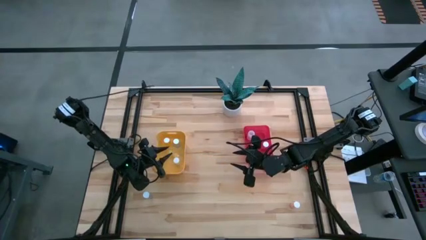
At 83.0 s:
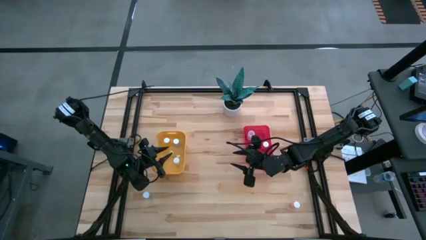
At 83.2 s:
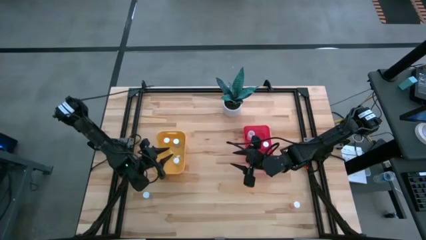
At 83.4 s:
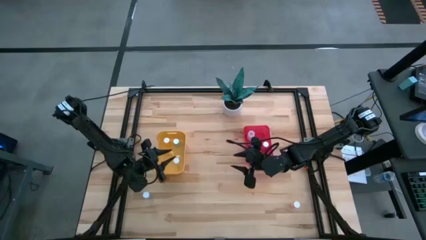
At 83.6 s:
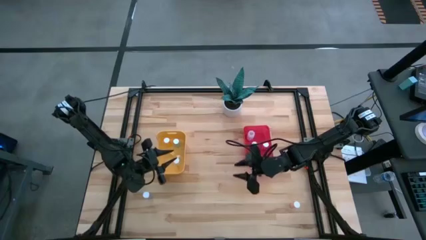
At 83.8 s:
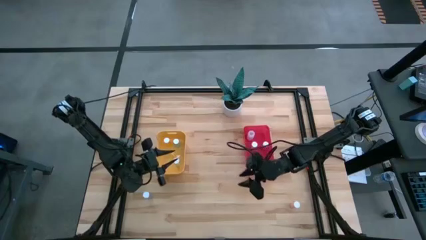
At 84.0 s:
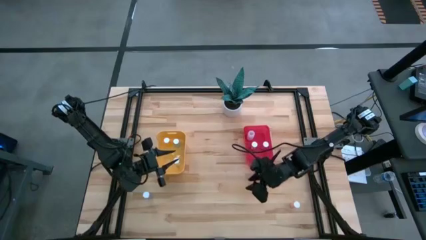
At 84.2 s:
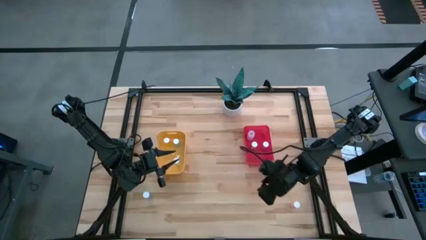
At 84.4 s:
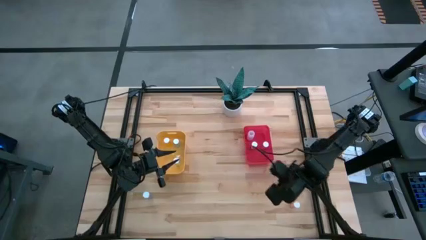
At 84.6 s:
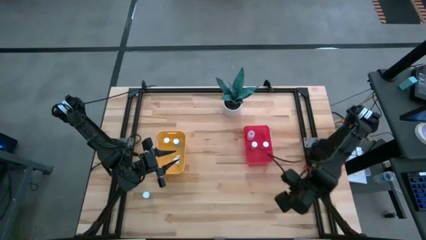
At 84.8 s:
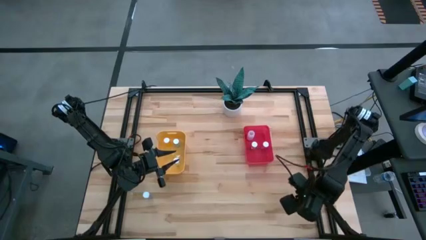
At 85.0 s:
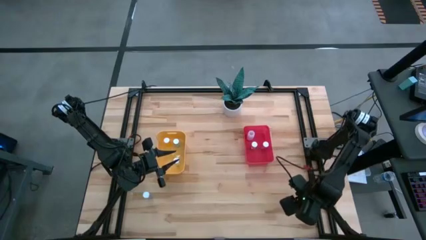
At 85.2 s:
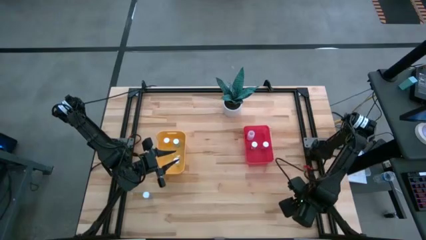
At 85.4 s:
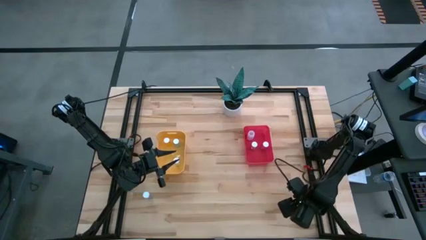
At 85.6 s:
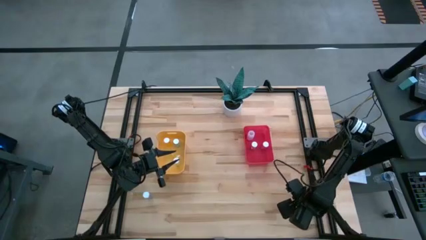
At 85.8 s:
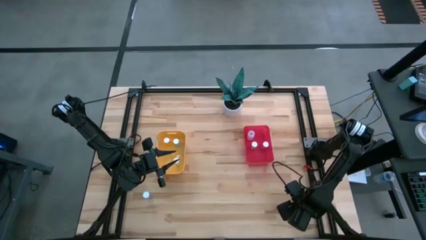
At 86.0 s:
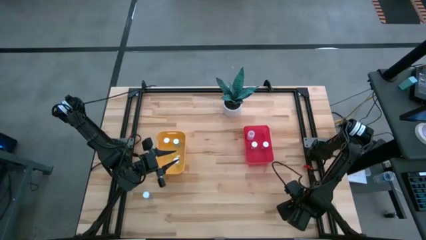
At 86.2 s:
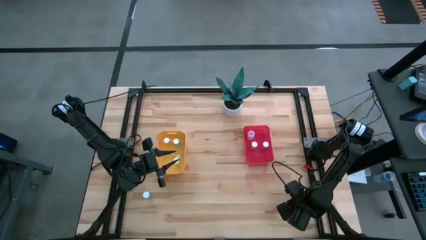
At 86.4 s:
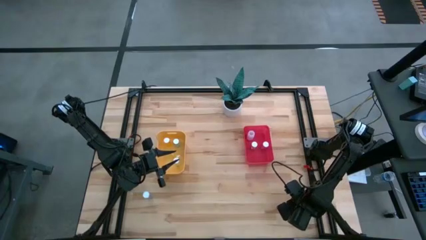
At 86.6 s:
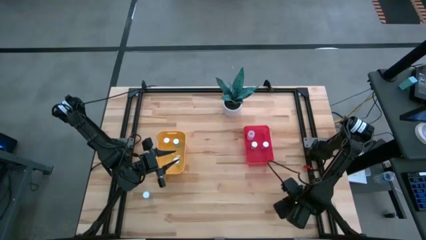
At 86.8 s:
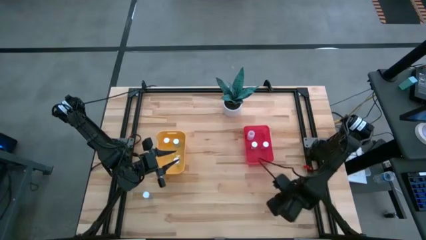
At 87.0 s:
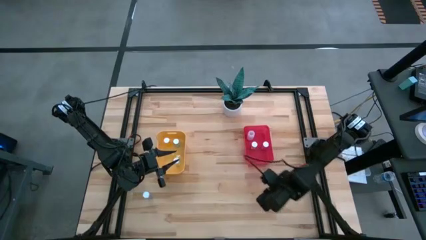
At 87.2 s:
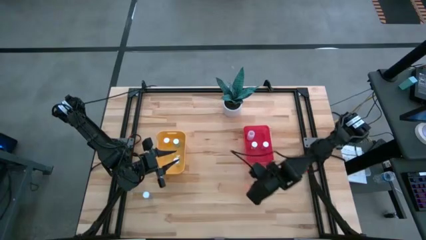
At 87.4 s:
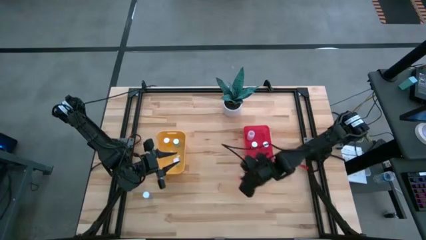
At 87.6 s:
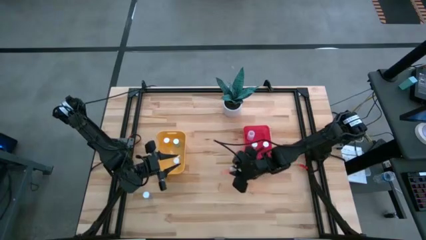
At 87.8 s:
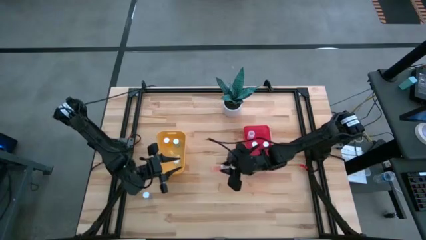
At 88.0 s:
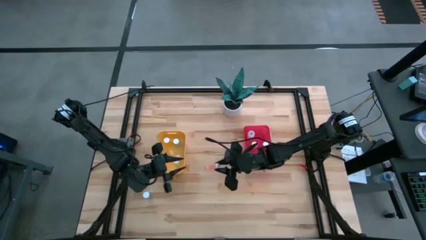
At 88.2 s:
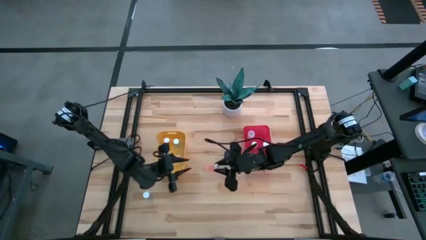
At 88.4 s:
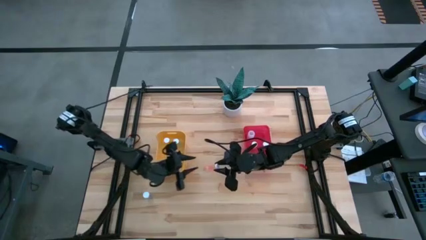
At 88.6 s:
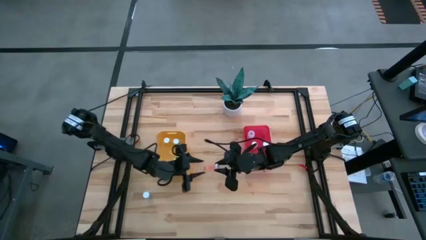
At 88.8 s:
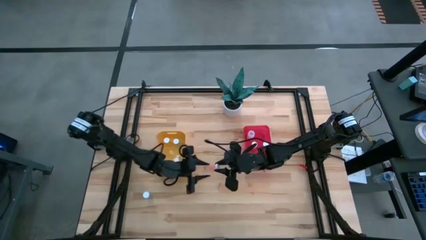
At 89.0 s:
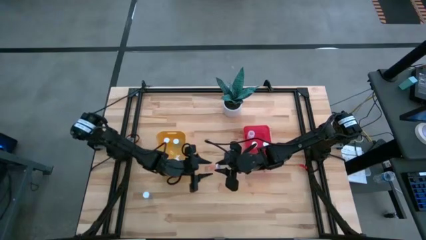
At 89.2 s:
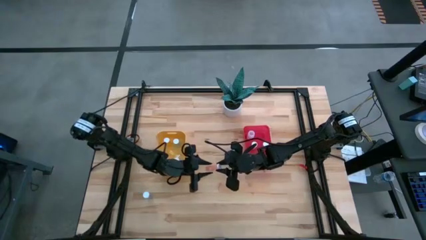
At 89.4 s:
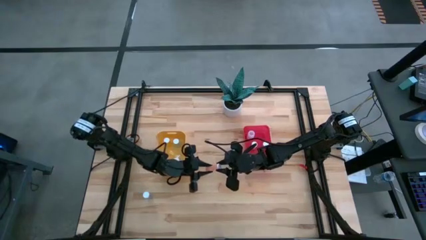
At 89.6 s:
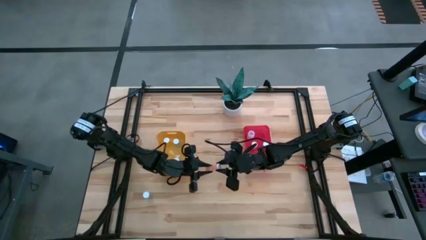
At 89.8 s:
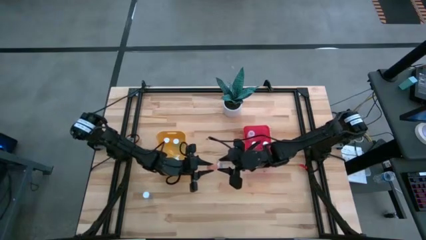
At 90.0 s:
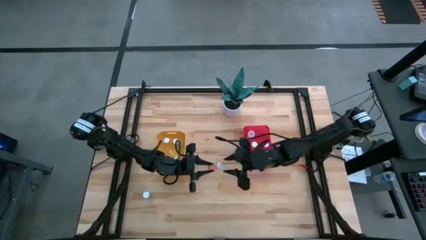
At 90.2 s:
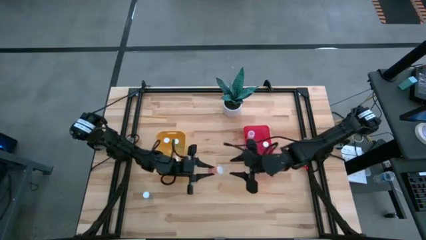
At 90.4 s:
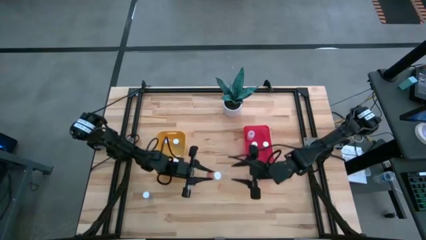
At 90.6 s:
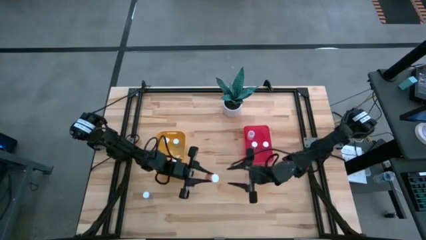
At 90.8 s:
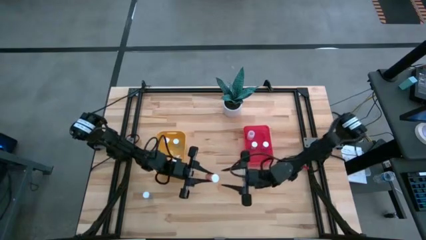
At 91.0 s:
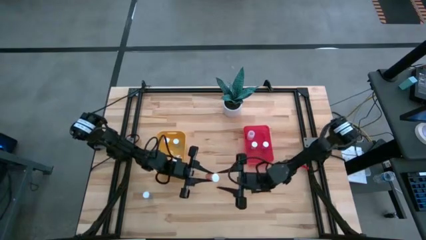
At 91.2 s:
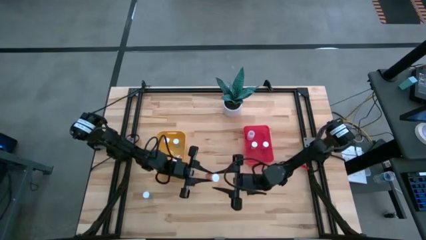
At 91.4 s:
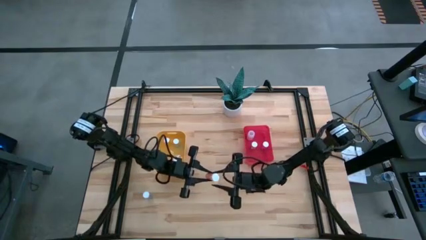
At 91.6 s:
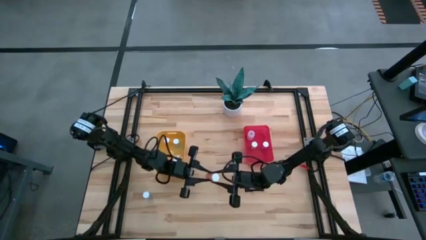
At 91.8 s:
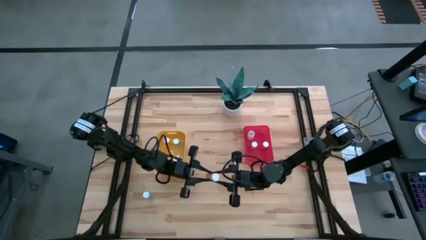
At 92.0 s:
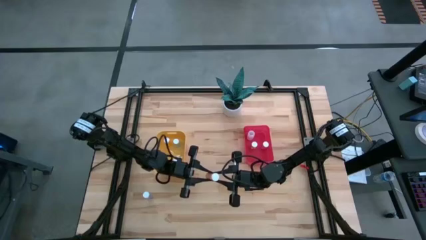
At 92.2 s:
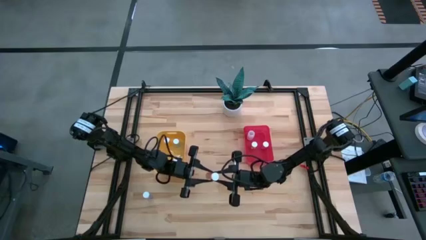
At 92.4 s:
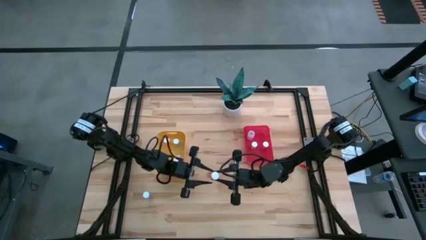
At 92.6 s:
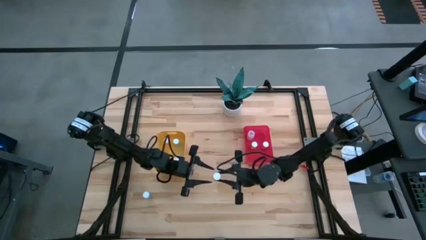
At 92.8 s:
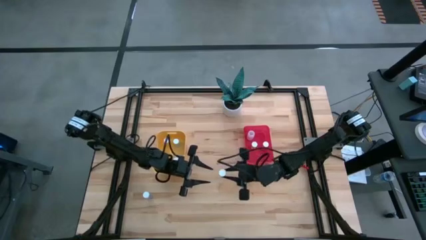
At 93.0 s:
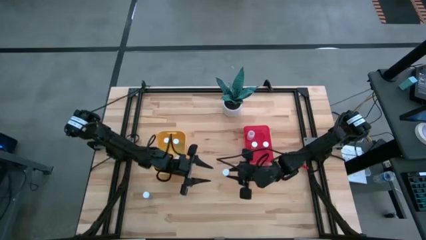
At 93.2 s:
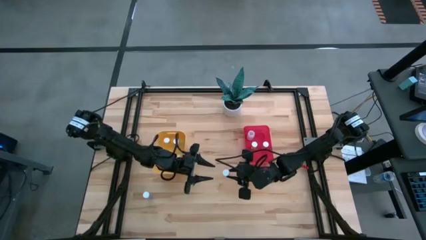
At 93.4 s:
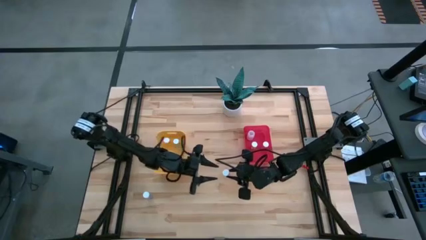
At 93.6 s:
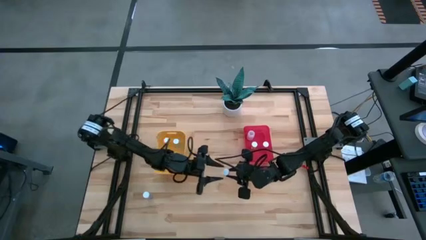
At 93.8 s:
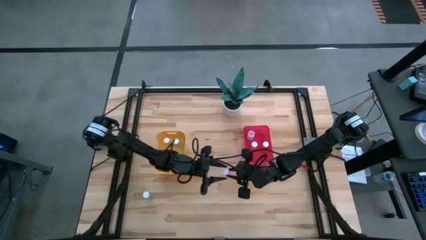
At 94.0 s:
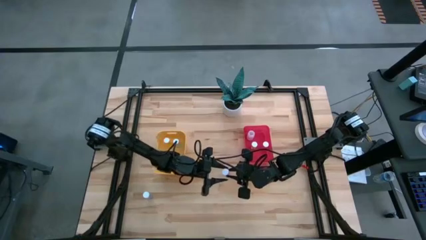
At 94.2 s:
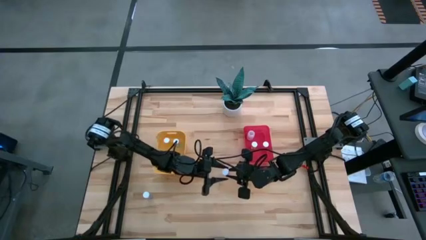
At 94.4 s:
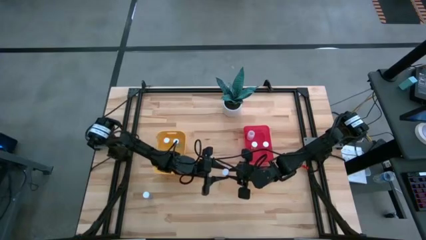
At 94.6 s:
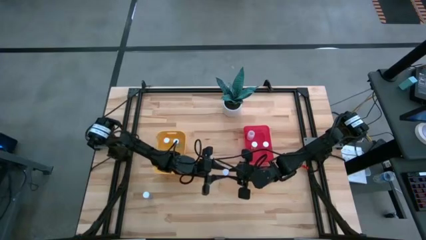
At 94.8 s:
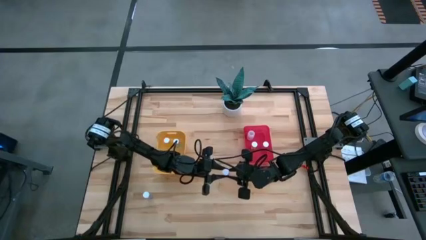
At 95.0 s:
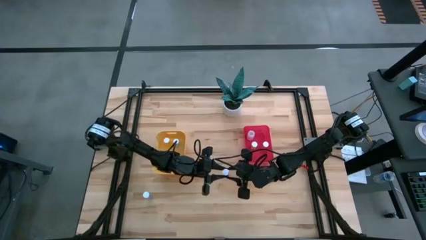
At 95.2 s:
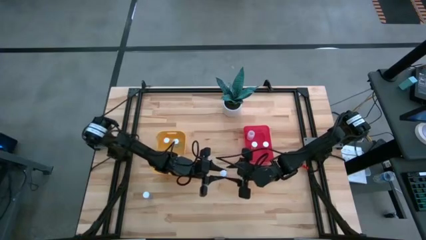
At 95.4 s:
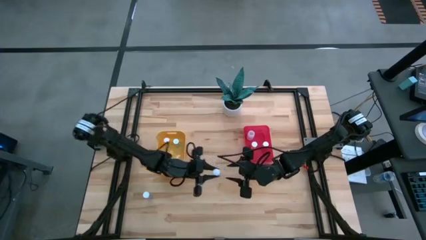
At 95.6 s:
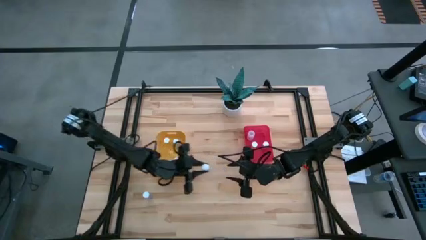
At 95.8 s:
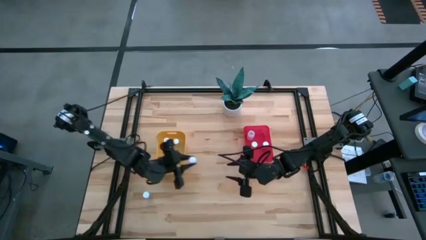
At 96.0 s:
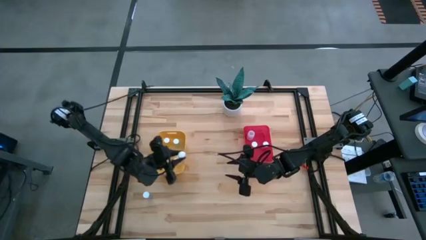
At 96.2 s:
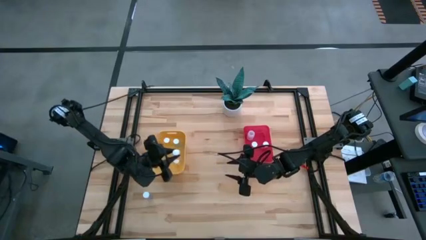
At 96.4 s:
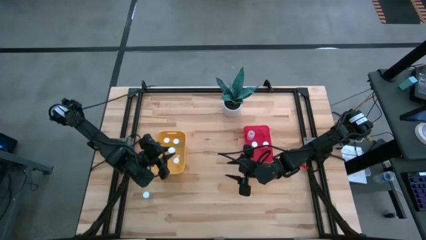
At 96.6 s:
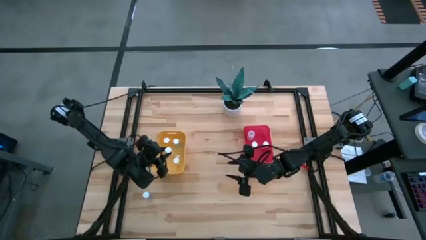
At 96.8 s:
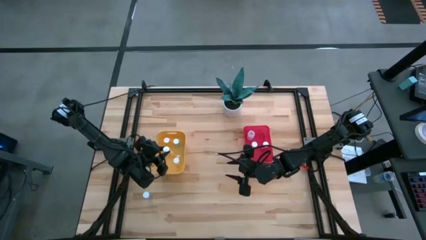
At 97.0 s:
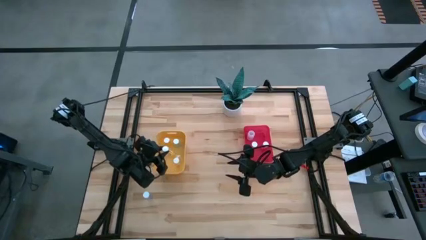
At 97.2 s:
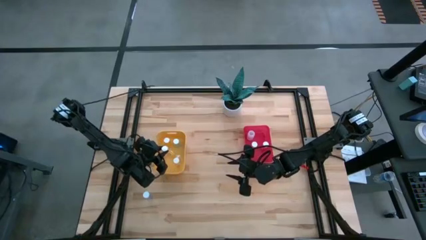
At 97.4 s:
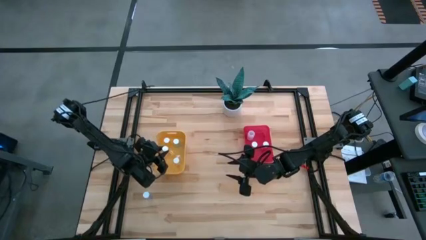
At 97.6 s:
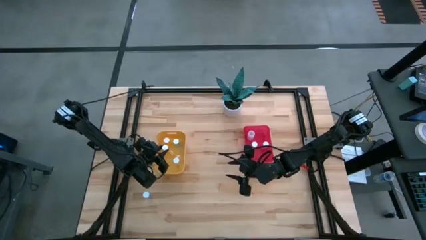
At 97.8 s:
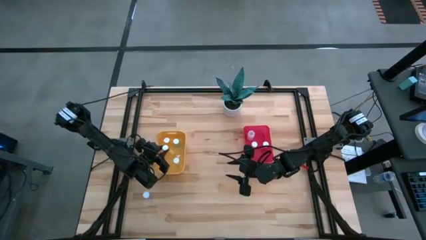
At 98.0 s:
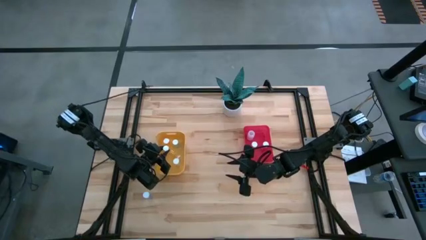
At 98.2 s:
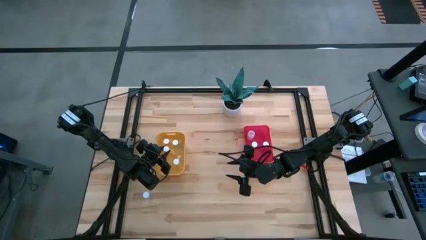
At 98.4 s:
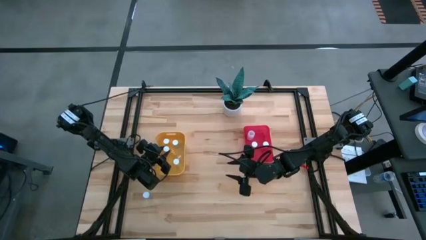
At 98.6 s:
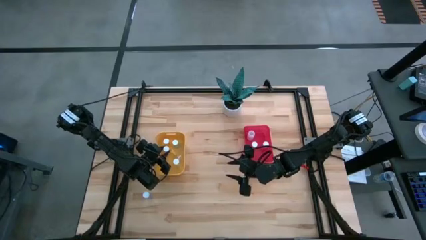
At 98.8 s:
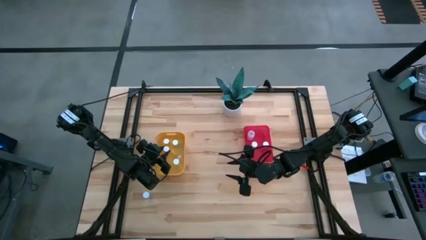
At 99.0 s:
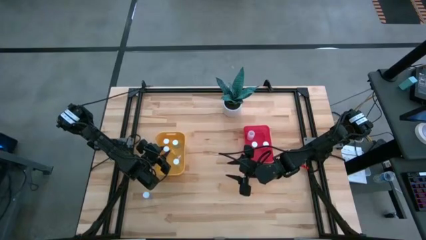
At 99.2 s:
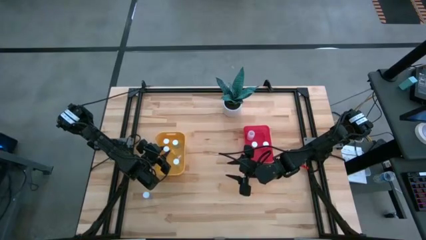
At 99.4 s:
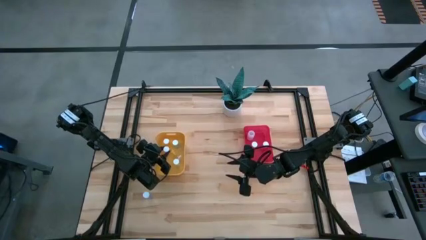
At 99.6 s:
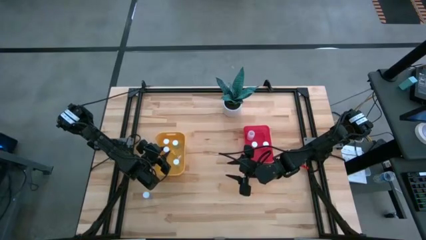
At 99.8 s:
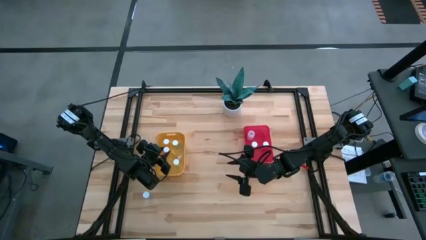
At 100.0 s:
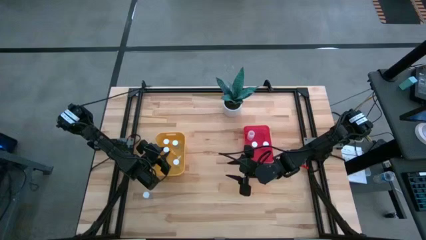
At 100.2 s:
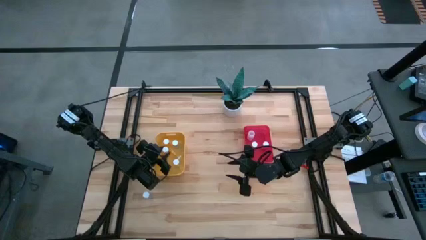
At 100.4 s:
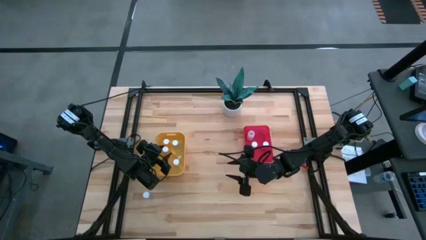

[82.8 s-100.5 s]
Task: Pick and place medicine bottles into bin by pill shape (circle, oval)
Put the pink tablet bottle into the yellow bin
